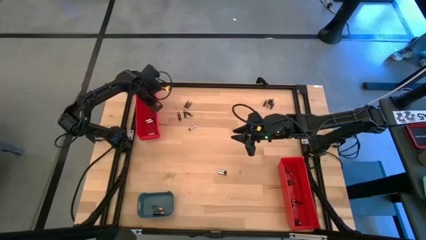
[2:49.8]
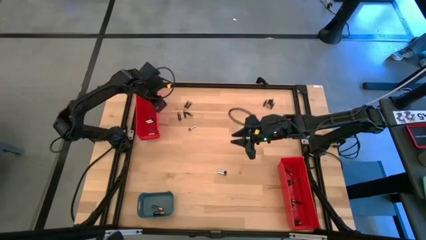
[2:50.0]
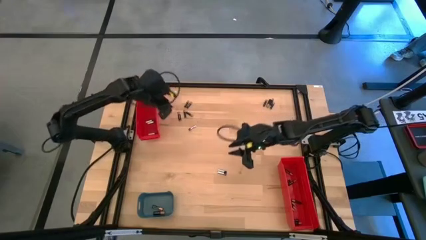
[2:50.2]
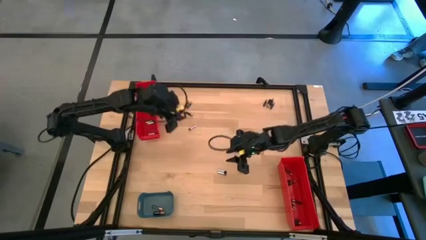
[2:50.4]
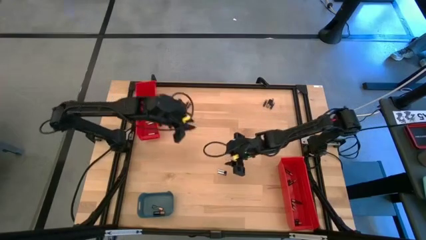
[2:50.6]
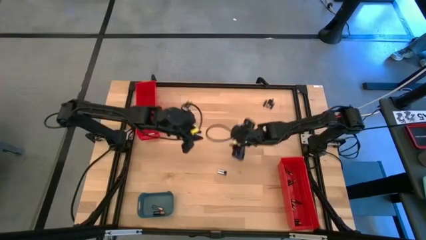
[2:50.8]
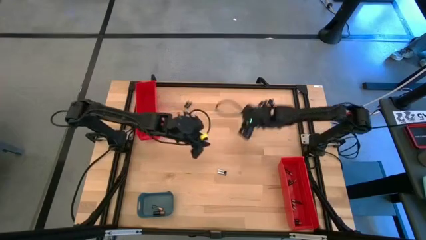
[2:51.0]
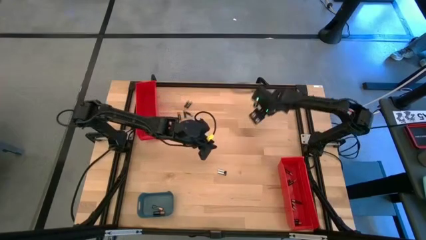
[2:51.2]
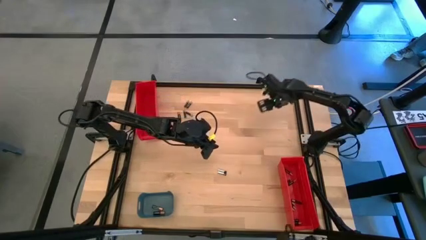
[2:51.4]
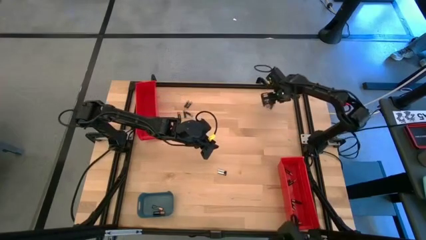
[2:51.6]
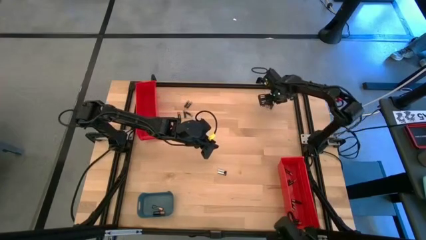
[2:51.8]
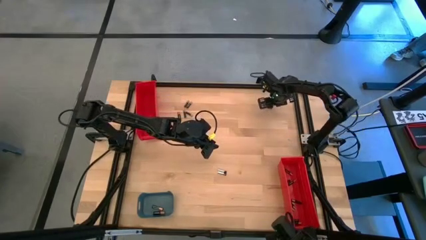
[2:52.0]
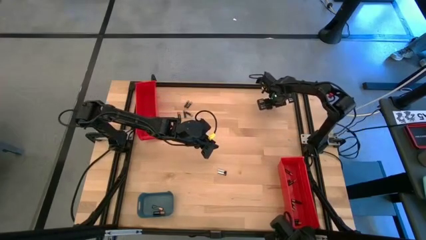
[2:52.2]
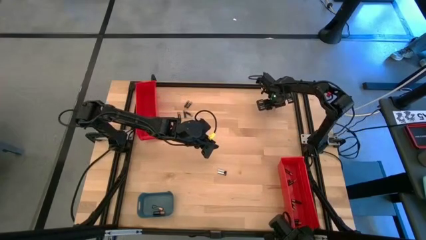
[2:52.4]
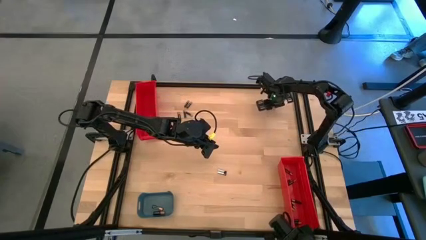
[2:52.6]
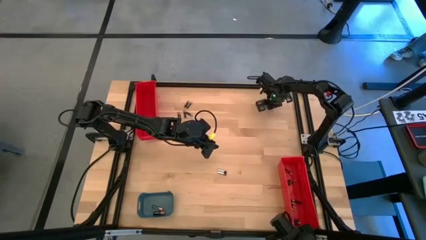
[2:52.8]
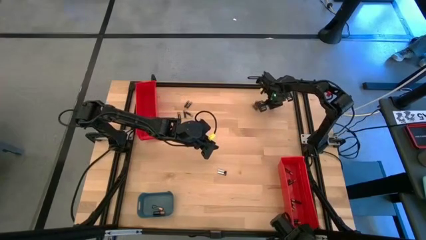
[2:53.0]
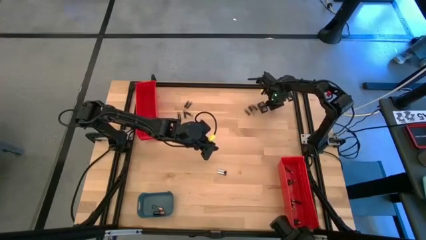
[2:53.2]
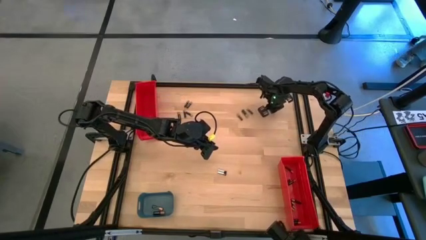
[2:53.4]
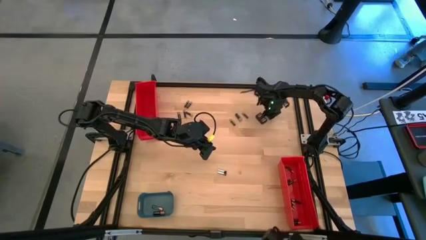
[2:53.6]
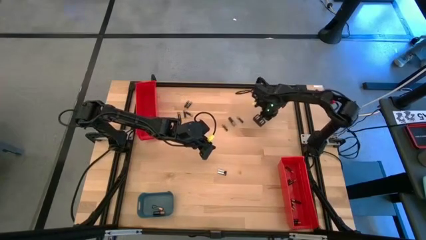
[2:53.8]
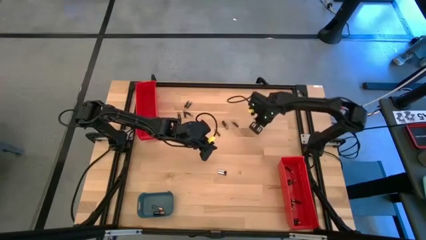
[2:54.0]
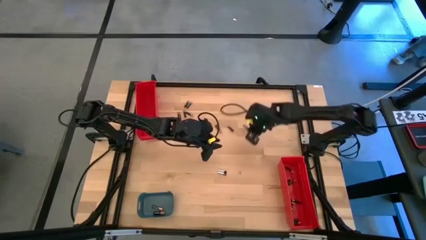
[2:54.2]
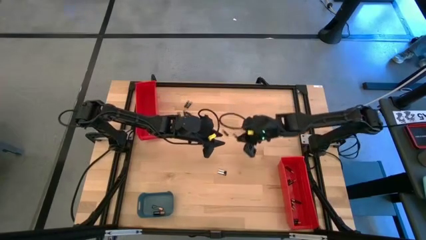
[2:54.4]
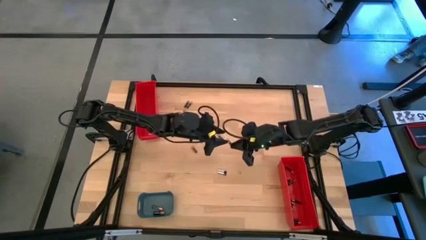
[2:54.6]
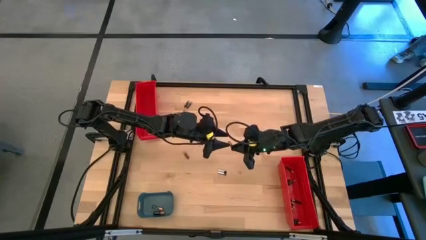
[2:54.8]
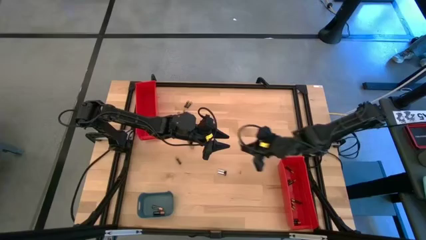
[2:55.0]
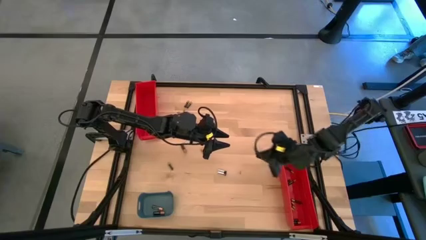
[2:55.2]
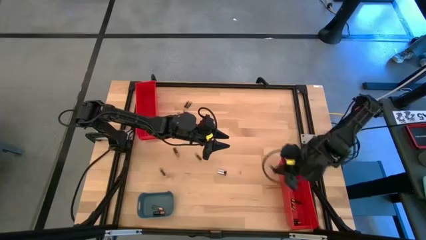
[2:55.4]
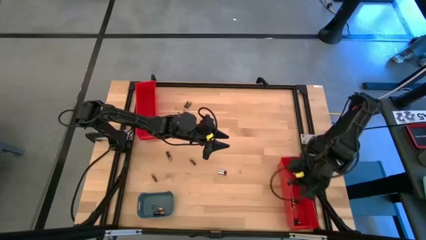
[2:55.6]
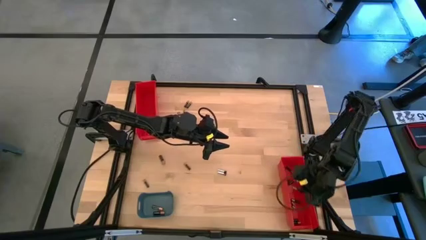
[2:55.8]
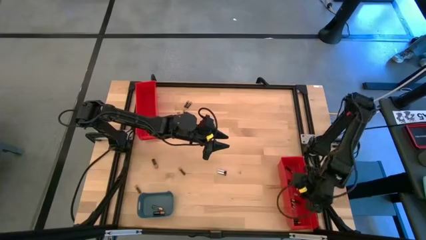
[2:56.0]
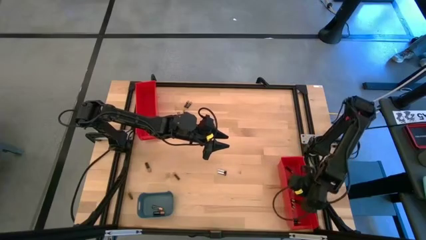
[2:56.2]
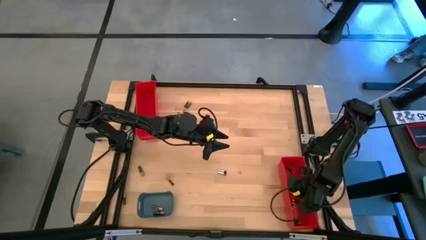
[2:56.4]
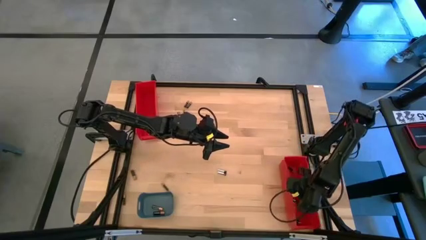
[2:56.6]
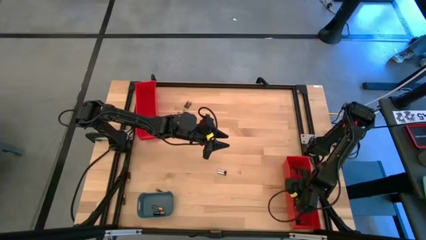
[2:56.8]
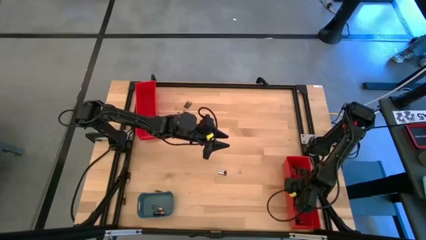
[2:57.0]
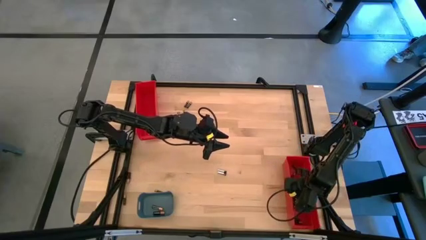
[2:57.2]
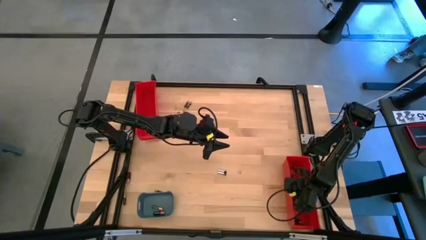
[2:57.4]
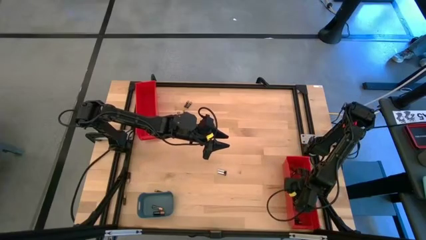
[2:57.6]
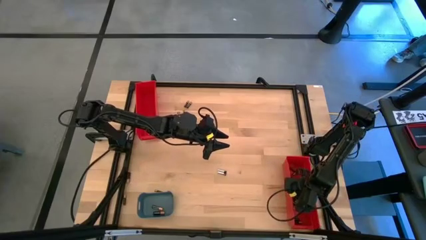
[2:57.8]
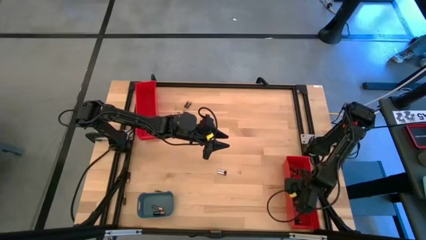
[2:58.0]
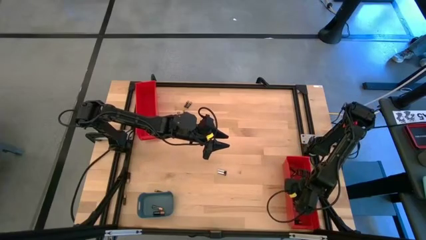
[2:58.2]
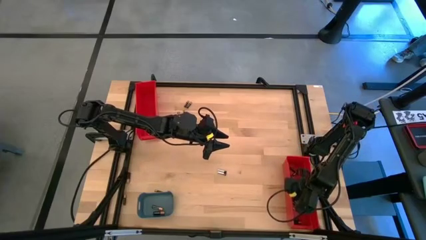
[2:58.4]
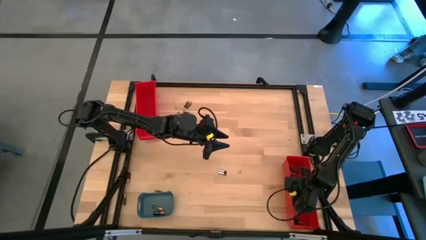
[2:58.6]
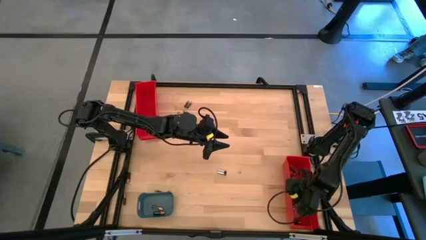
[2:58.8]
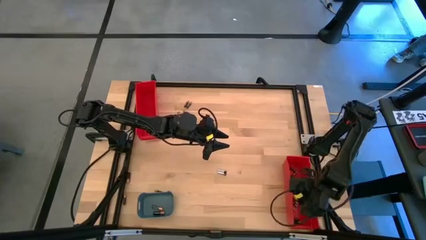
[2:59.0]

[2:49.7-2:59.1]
Task: Sort batteries
Put the small black battery into the bottom red bin

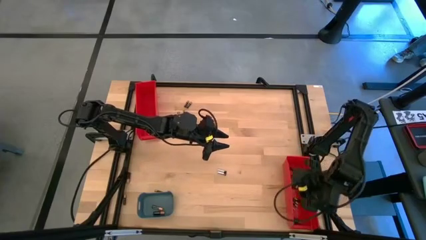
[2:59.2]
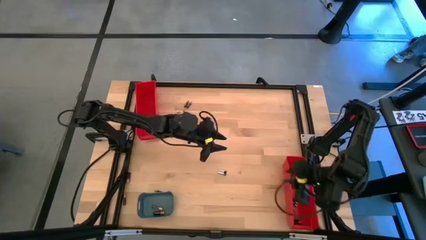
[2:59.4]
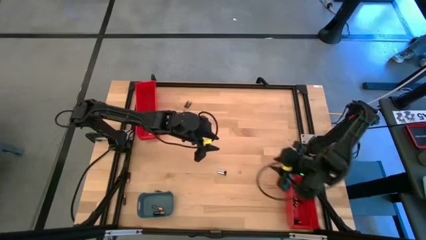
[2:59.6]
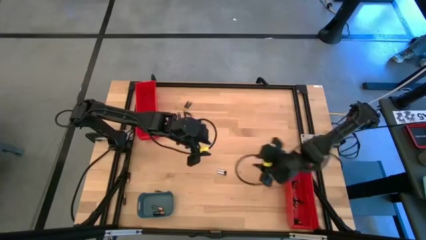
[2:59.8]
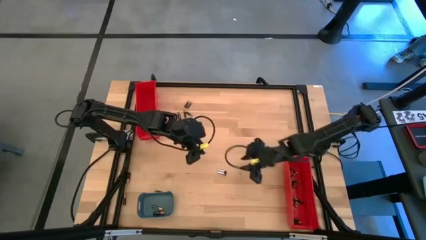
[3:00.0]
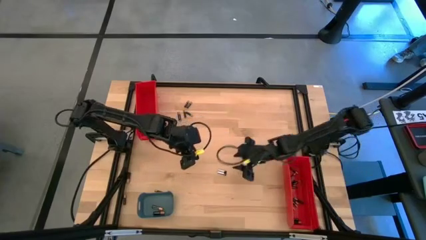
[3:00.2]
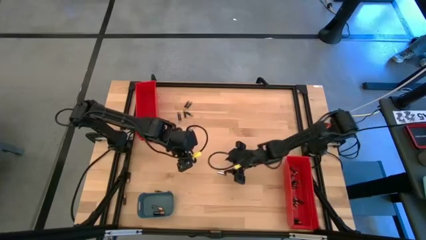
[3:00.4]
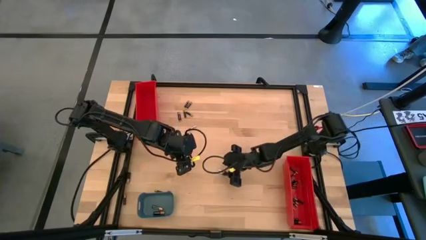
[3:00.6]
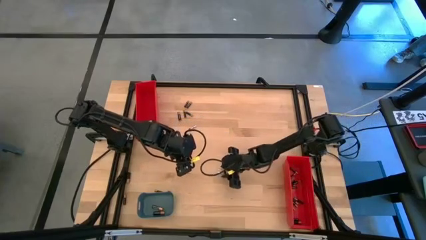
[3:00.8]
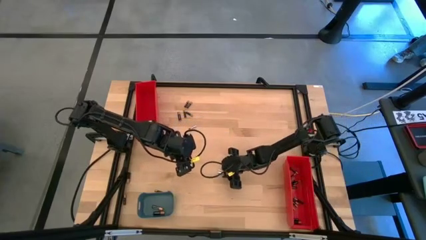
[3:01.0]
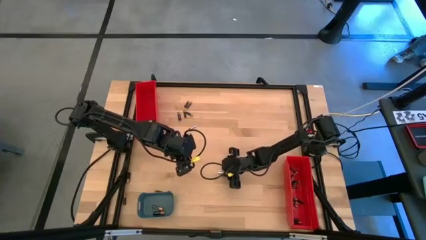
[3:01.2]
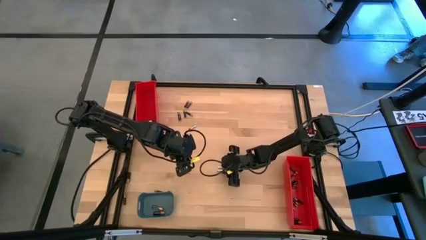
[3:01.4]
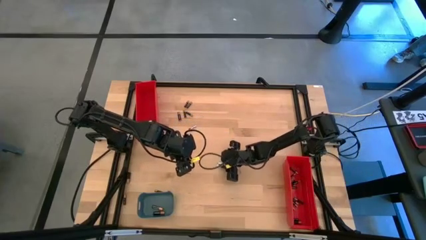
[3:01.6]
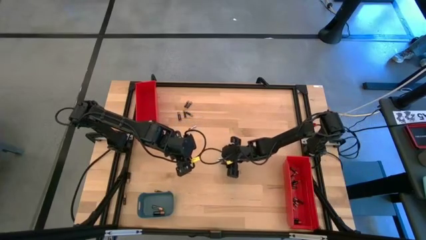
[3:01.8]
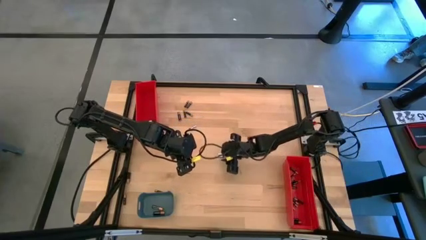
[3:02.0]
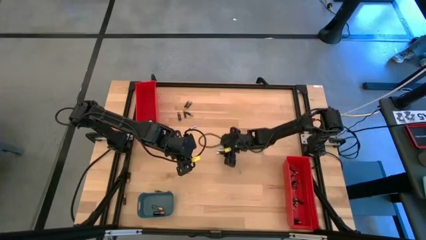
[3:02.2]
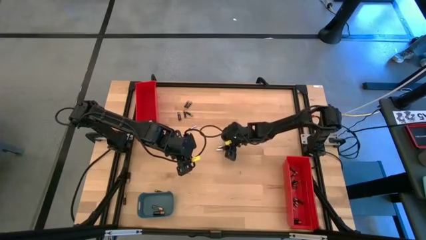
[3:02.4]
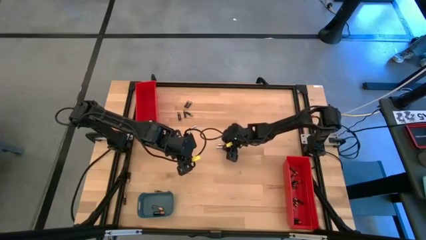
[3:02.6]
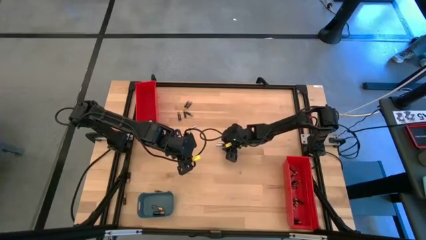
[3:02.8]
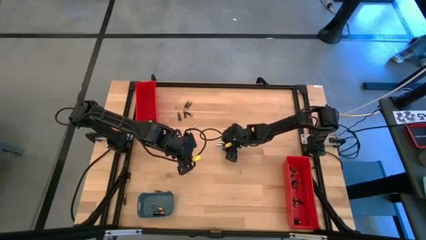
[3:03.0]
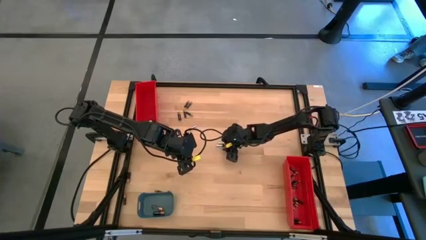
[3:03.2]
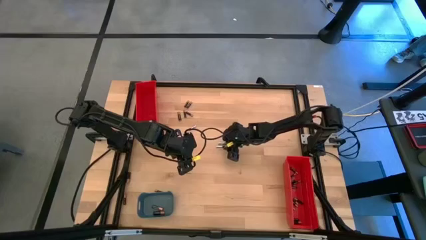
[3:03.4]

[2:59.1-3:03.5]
Put the silver battery into the top red bin
